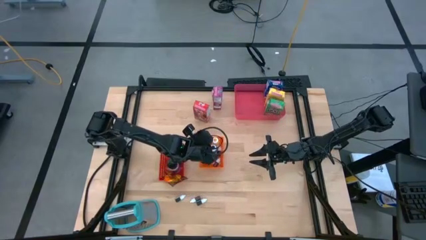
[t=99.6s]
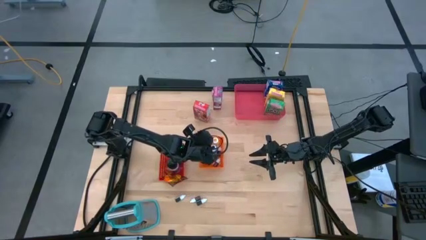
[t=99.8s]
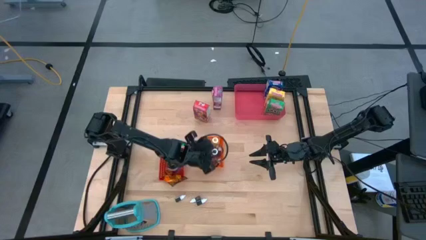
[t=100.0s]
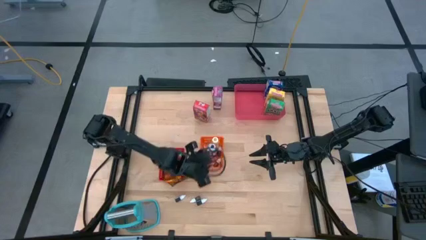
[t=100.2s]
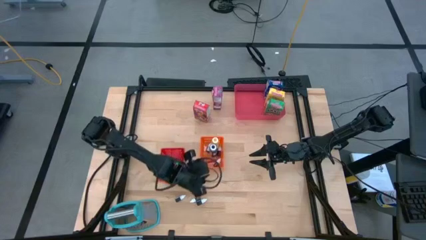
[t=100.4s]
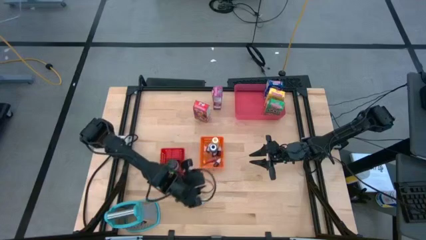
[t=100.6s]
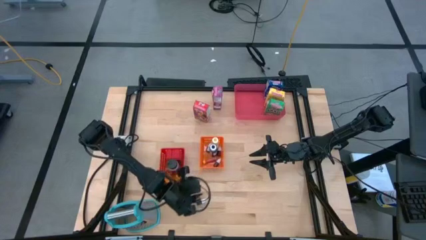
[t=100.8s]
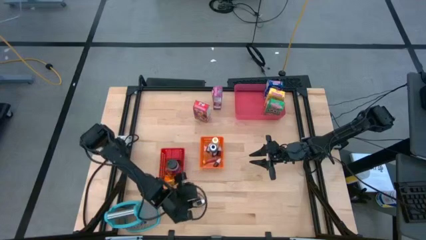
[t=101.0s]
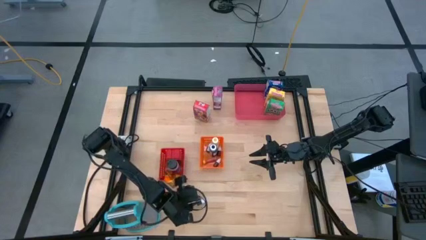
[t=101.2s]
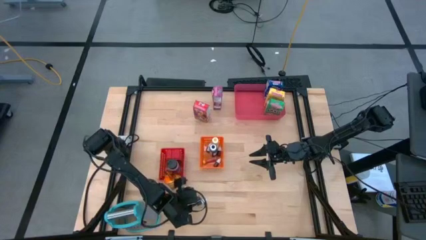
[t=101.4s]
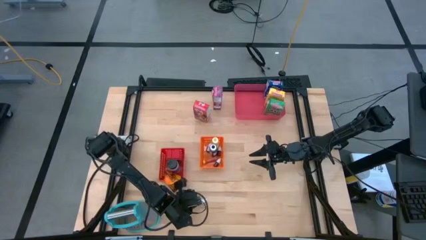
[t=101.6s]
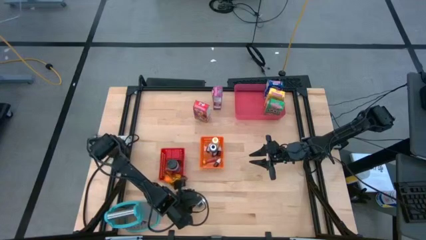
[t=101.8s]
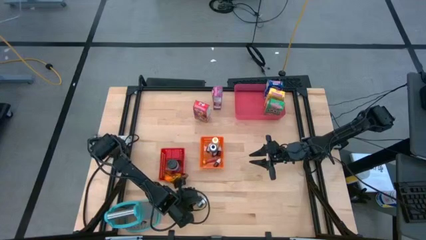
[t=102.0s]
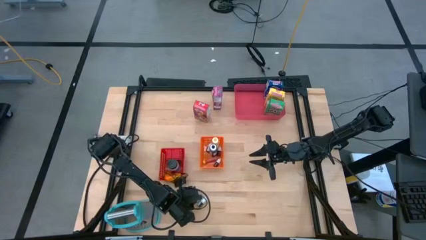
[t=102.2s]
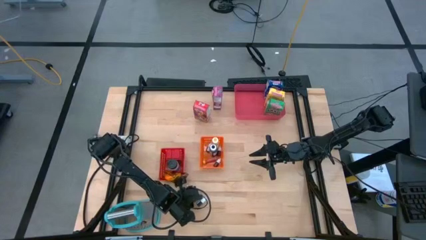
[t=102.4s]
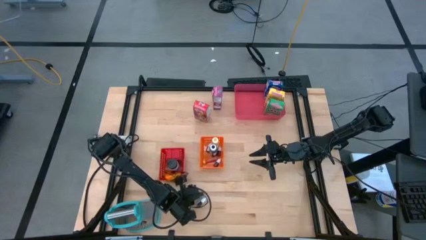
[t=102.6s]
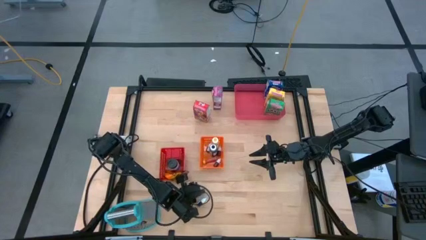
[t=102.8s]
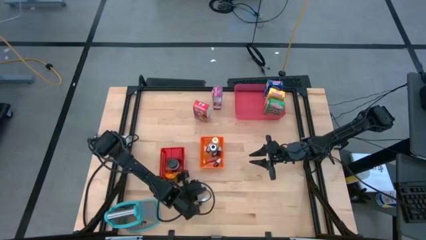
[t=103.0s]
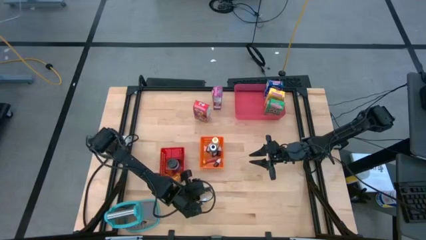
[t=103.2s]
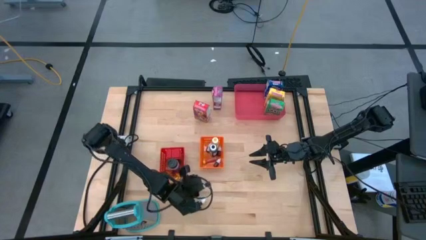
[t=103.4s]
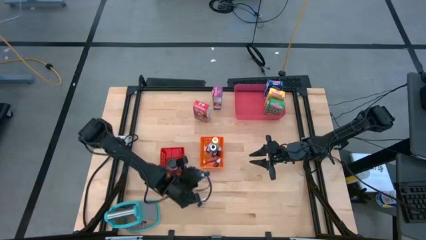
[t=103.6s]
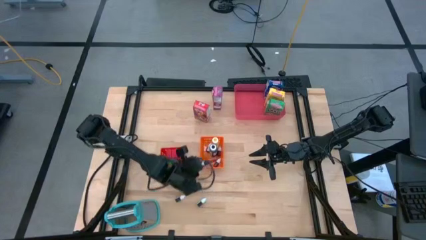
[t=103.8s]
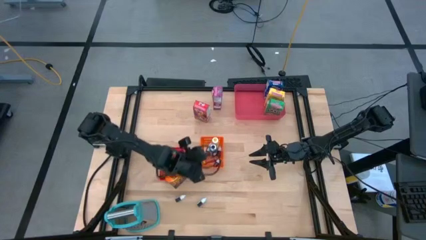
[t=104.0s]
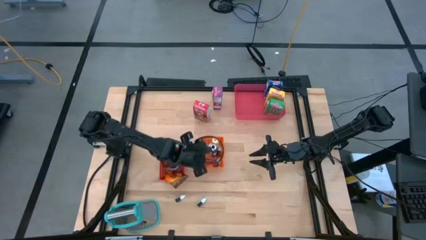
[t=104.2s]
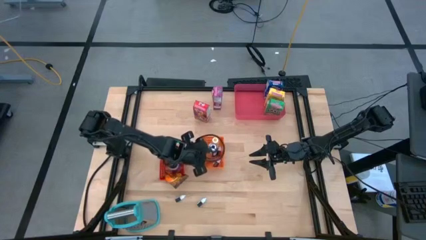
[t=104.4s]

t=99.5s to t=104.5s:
Task: Pick & Place Kitchen Items
Put the small brown food coloring bottle into the orange bin

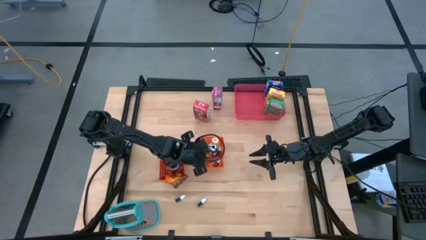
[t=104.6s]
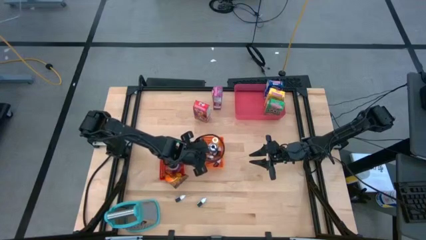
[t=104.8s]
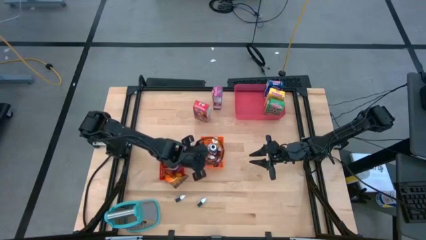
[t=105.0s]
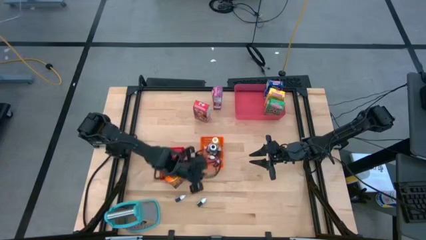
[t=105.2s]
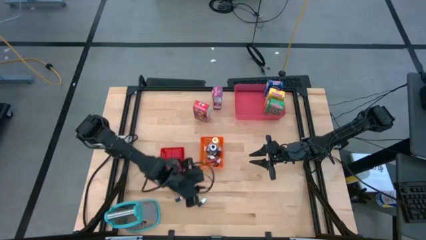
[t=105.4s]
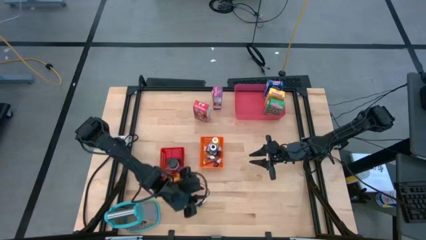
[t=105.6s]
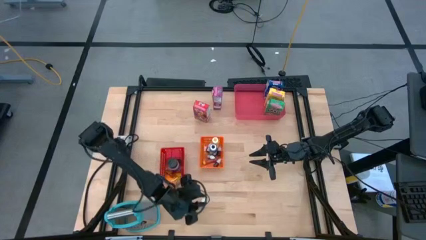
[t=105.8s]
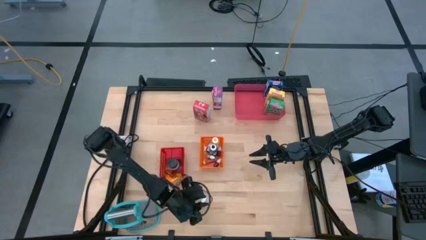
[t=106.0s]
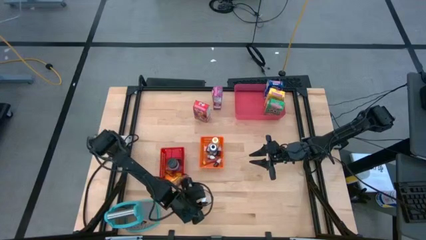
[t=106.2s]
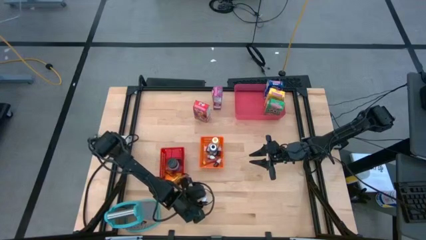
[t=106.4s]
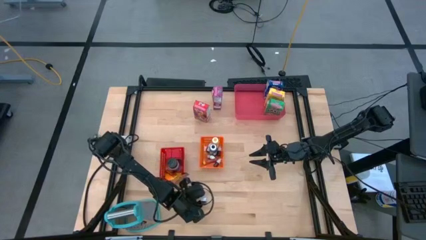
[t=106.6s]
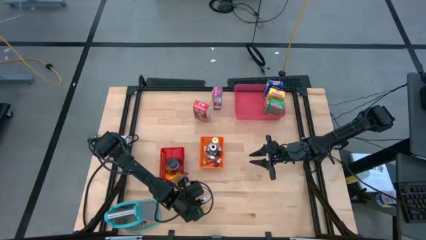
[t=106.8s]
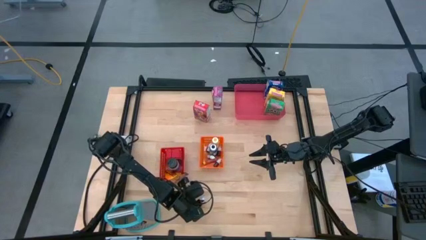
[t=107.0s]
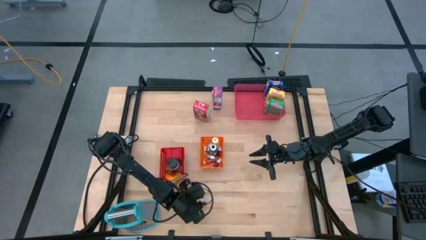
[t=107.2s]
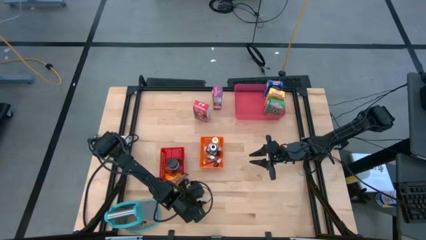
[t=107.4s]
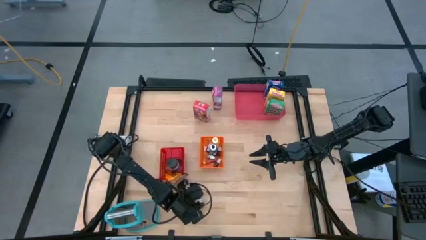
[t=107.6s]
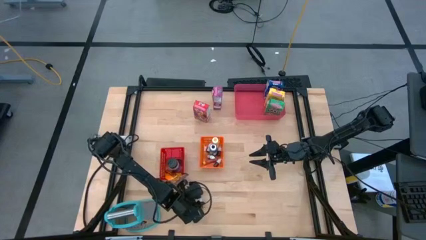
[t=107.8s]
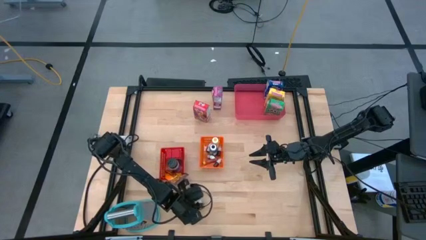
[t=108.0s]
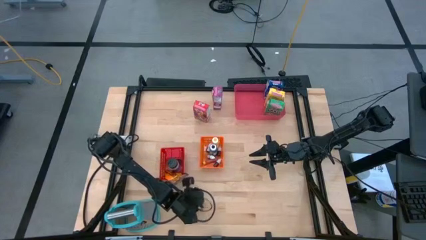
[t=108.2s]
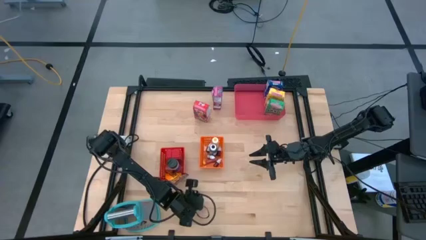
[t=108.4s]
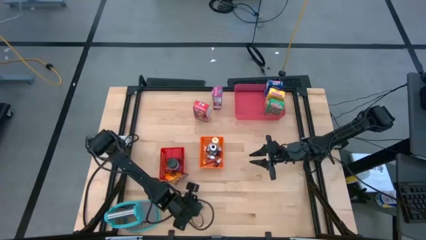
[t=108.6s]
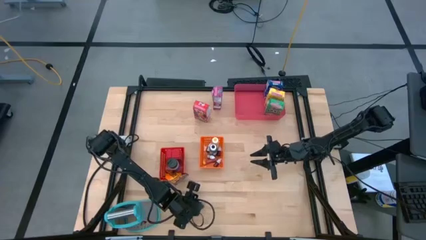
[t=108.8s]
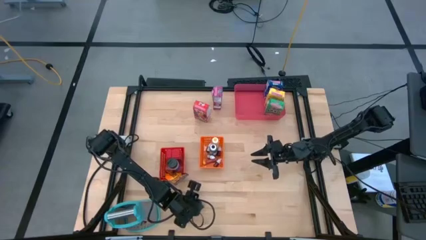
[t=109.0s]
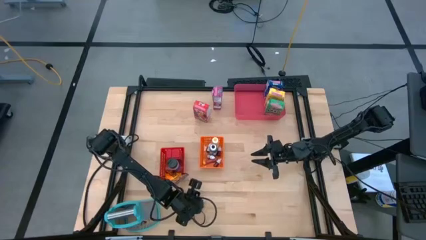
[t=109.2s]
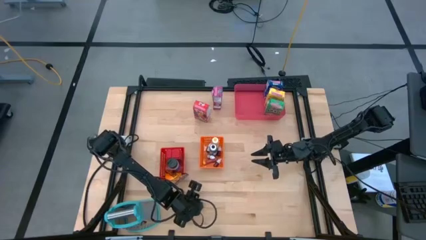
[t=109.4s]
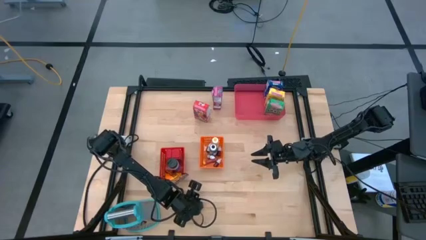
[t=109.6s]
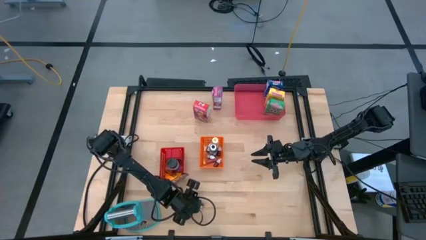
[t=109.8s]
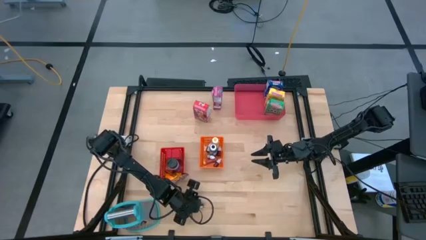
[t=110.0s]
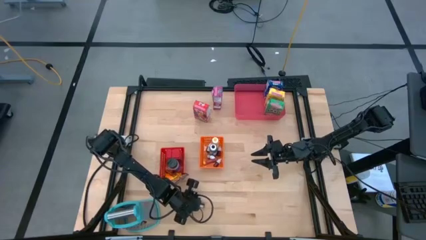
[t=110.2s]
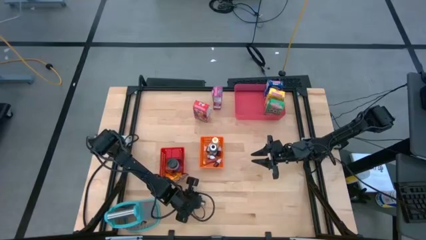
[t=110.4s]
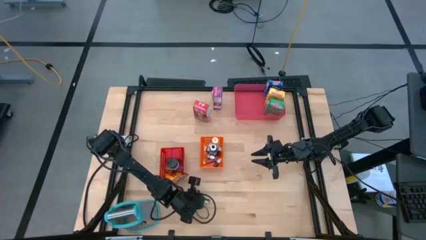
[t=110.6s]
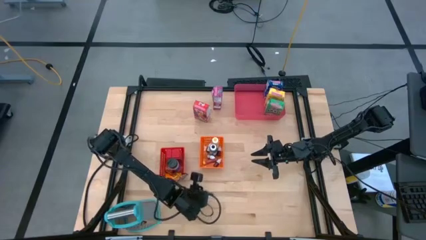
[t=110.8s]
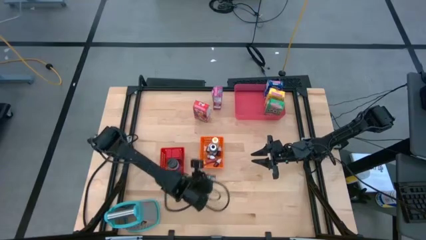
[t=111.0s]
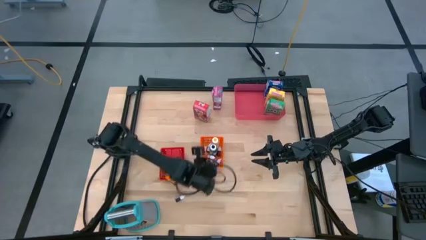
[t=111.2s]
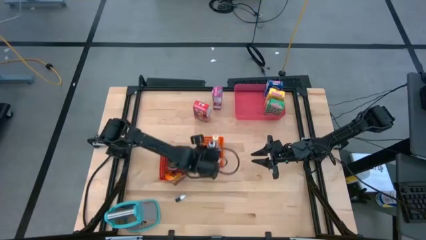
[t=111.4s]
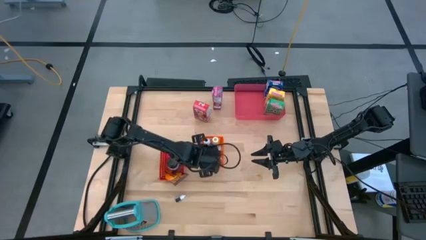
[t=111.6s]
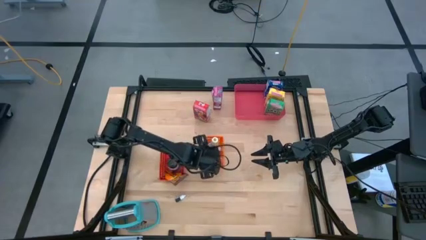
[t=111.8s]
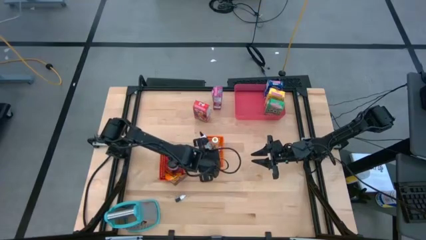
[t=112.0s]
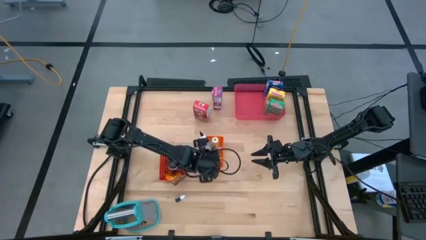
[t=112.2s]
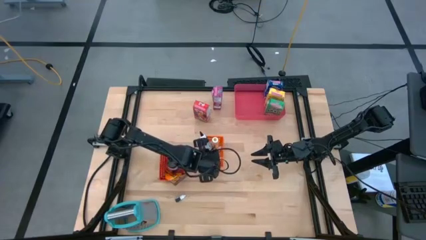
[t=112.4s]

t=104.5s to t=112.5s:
Put the small right black food coloring bottle into the orange bin

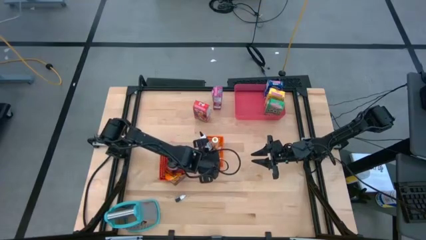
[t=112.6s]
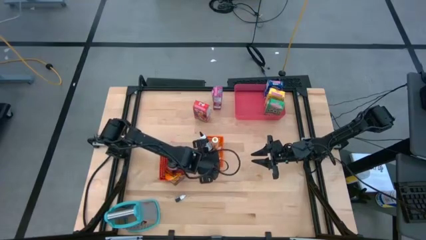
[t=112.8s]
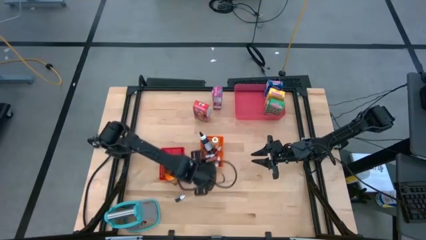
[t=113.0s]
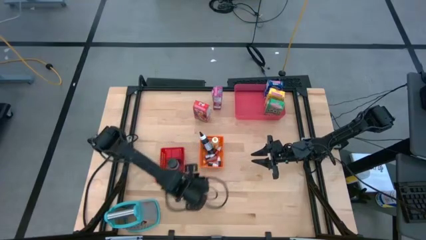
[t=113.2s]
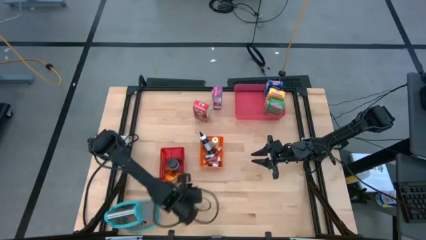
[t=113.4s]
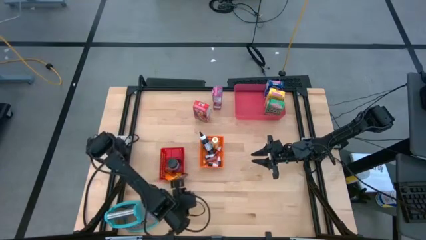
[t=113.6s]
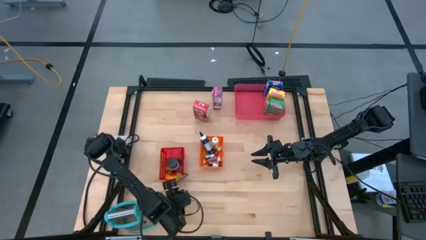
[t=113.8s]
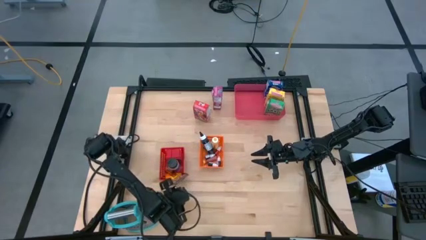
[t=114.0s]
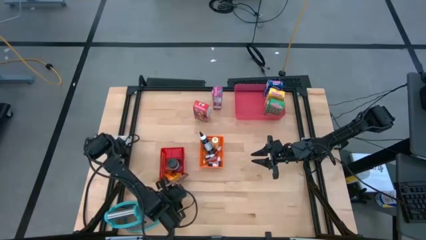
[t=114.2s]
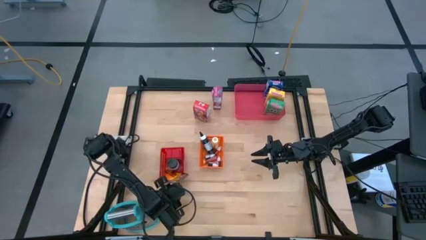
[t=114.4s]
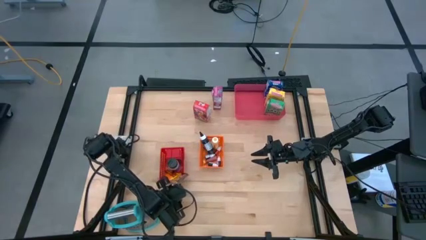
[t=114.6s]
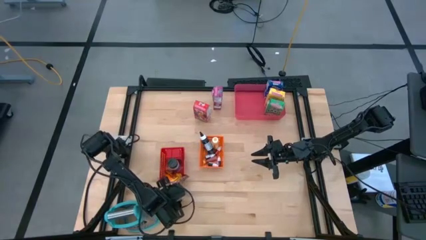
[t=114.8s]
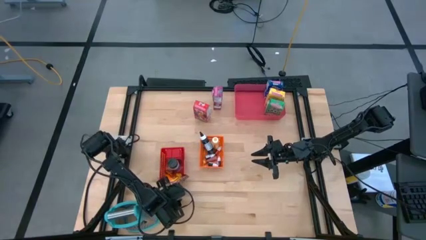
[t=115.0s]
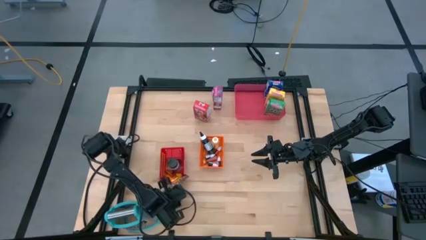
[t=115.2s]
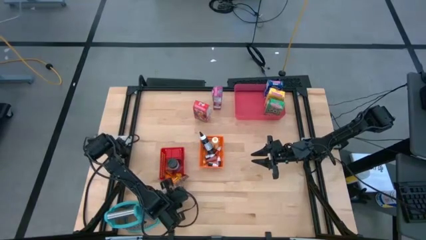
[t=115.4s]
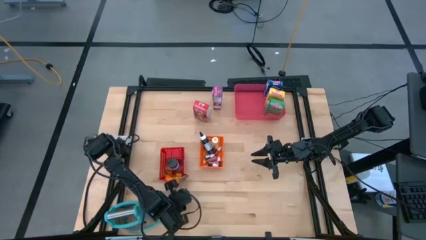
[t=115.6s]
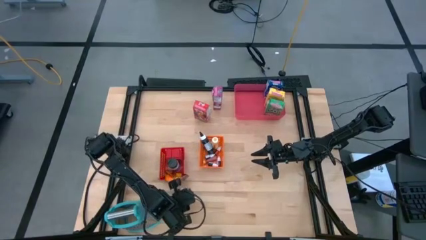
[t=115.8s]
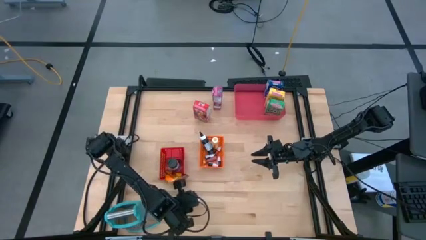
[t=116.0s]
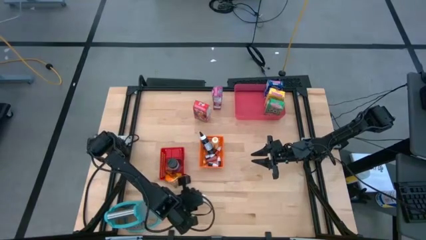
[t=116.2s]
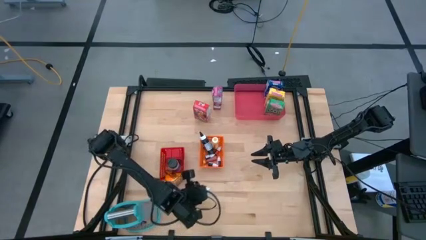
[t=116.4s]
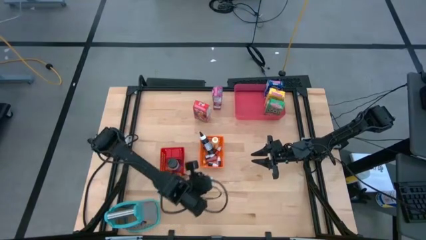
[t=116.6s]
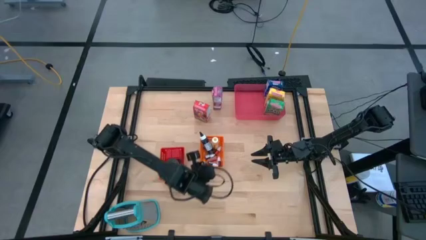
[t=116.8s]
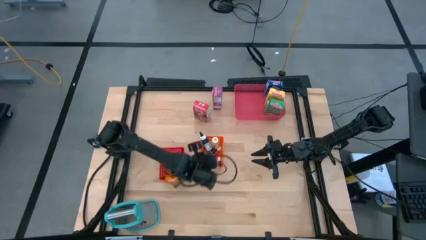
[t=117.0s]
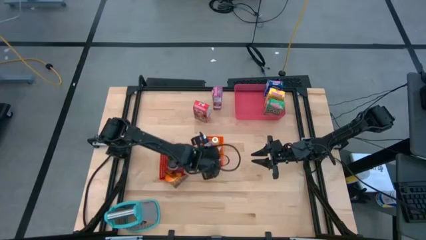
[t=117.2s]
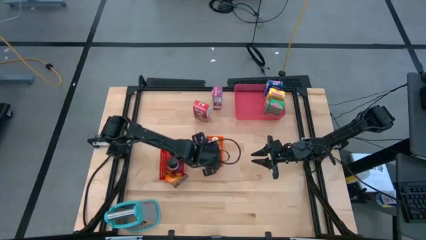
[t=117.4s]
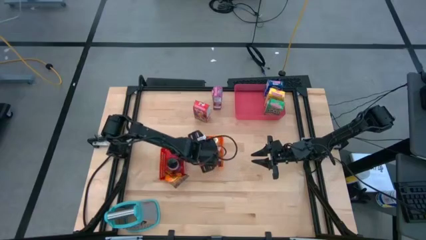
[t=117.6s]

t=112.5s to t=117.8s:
Put the small black food coloring bottle into the orange bin
